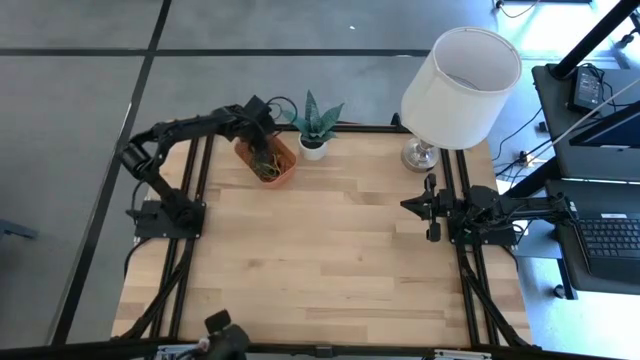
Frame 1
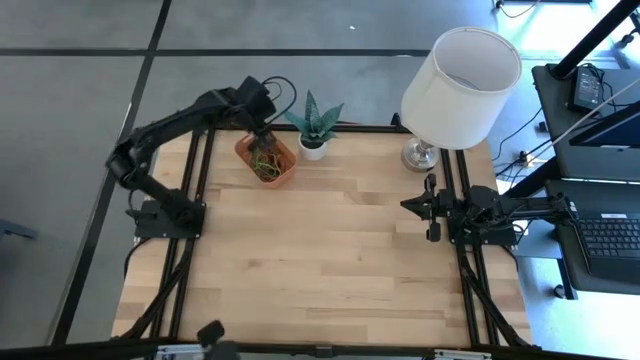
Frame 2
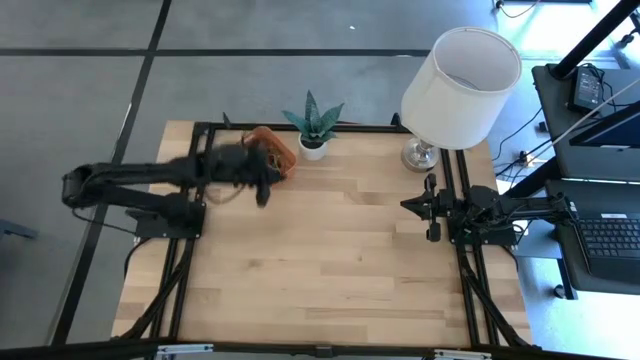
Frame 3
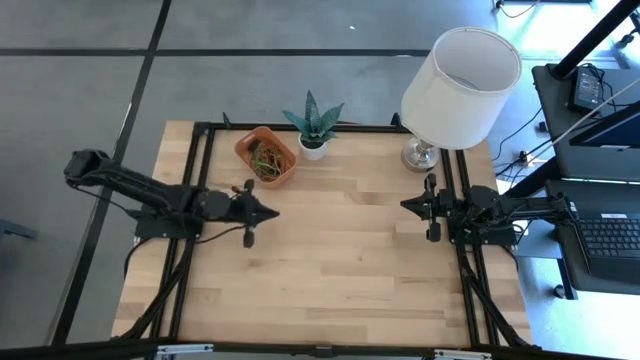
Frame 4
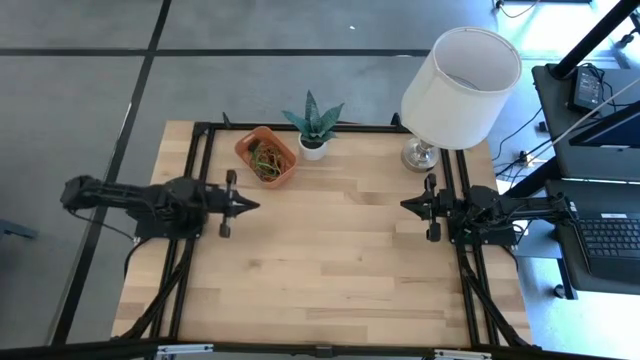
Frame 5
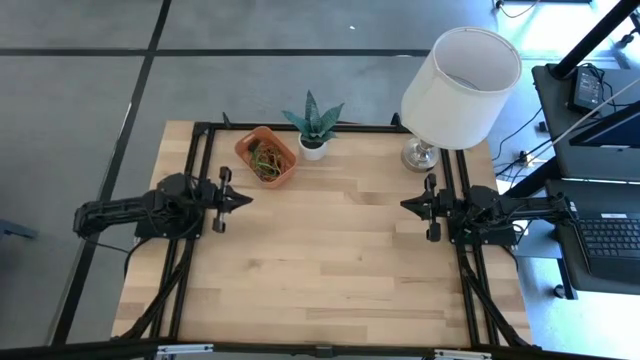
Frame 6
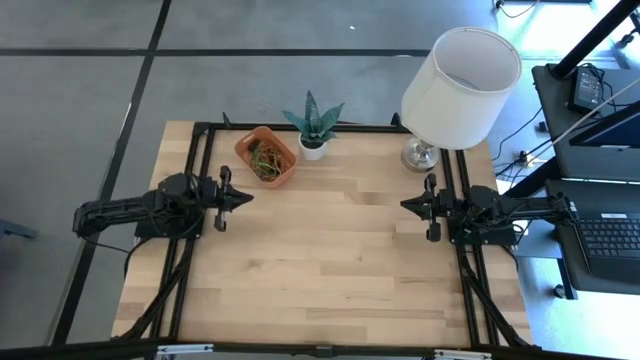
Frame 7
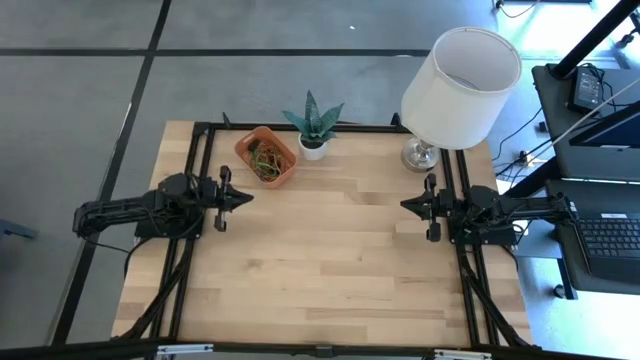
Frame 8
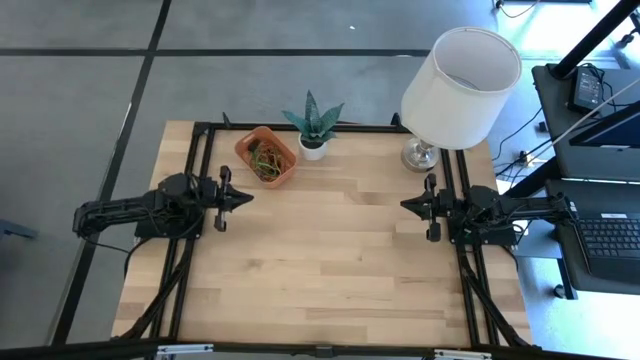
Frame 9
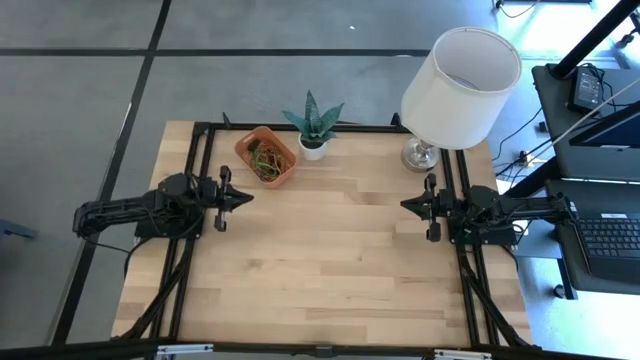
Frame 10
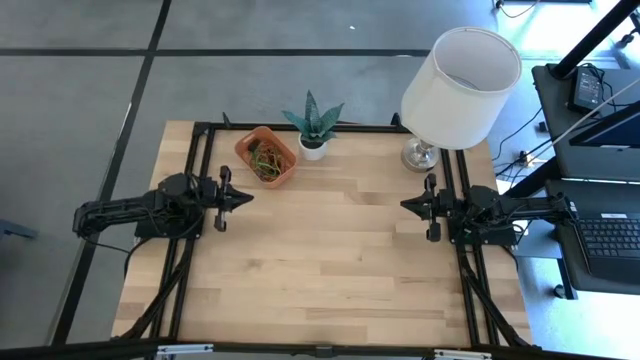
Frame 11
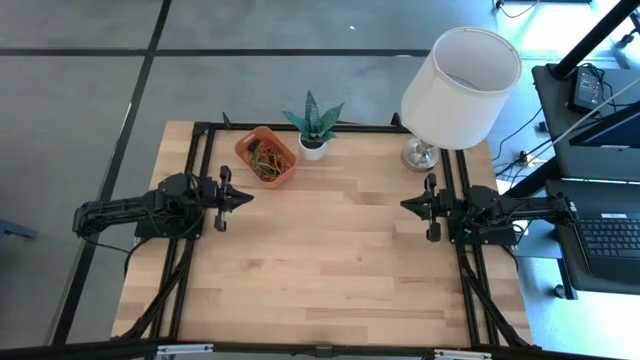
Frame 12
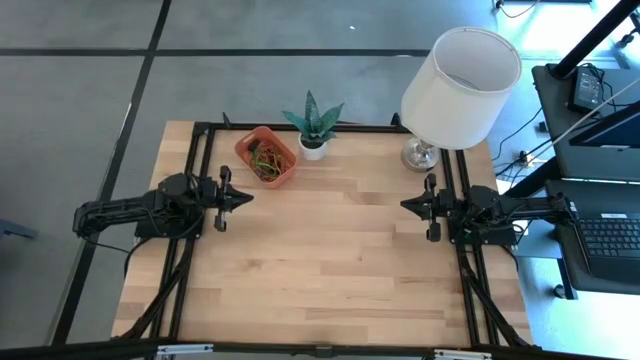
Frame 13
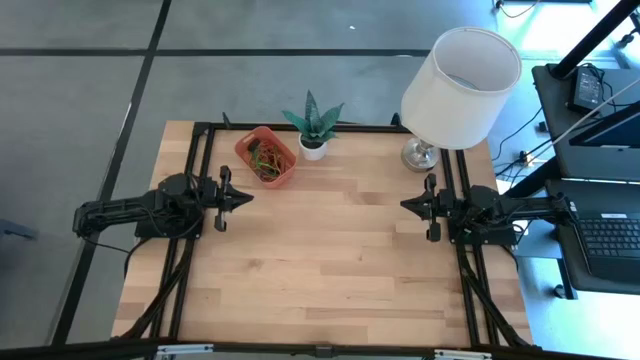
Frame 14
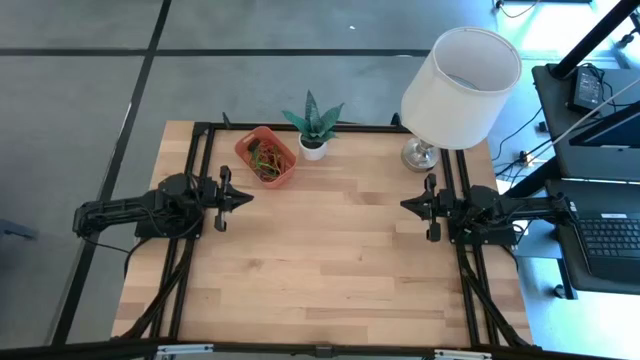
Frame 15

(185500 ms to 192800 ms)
Task: Pick and place rubber bands into bin
Return to Home Position

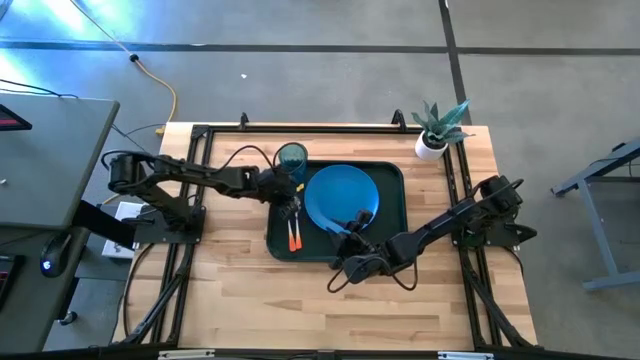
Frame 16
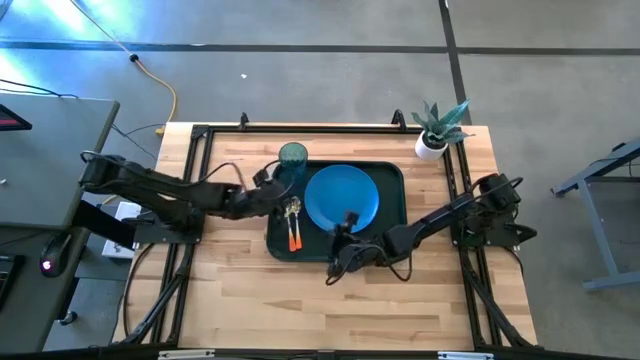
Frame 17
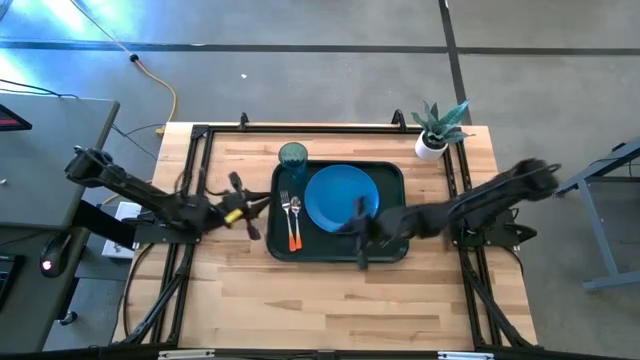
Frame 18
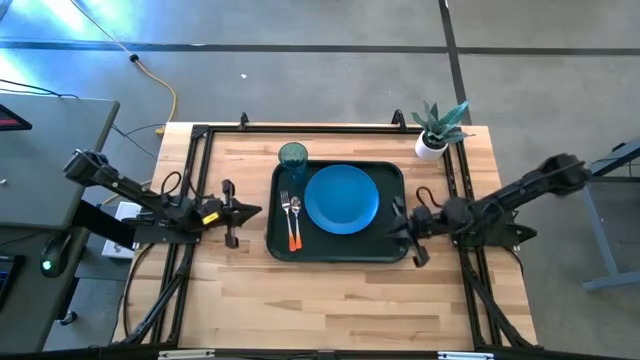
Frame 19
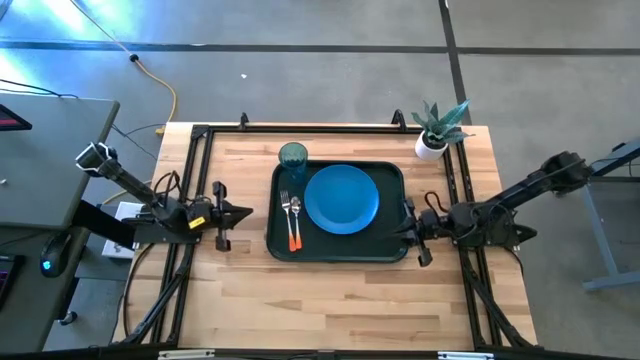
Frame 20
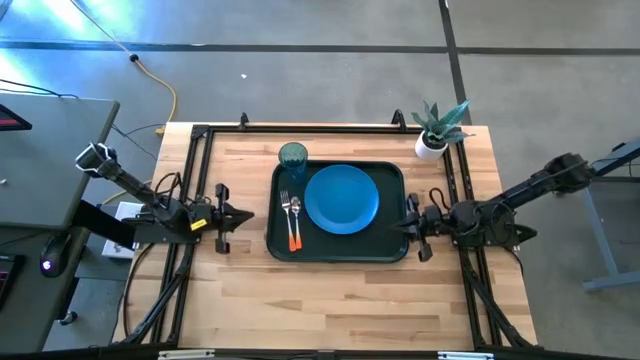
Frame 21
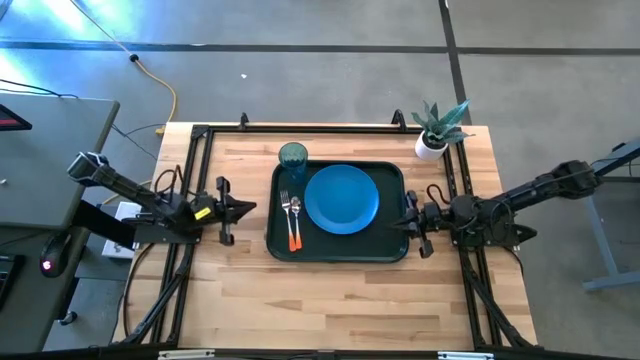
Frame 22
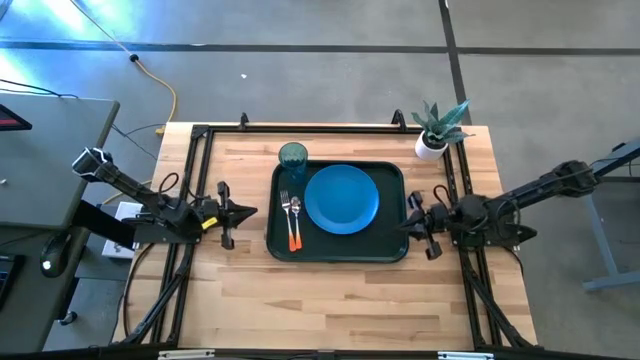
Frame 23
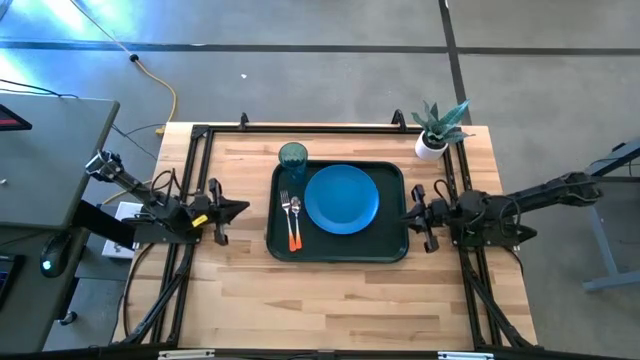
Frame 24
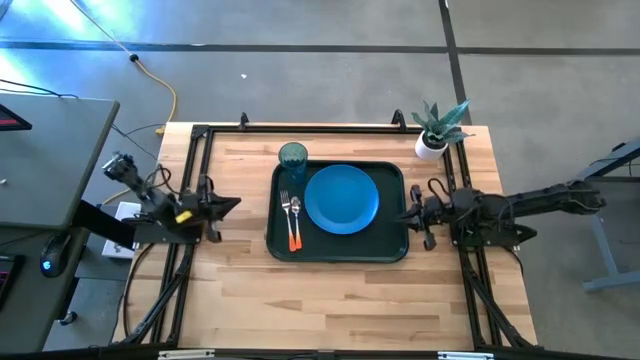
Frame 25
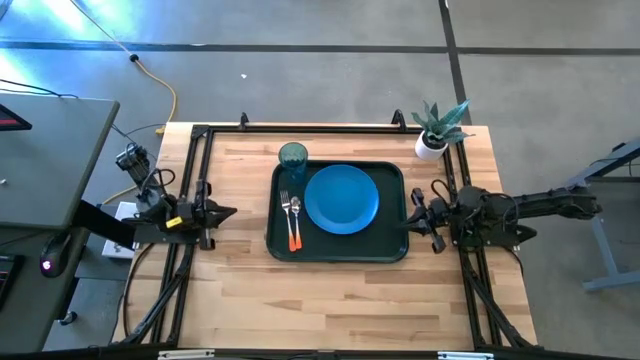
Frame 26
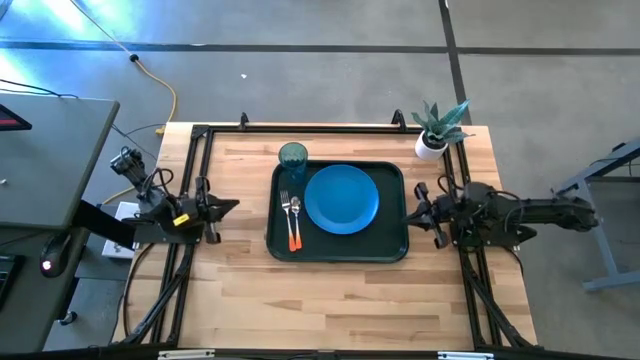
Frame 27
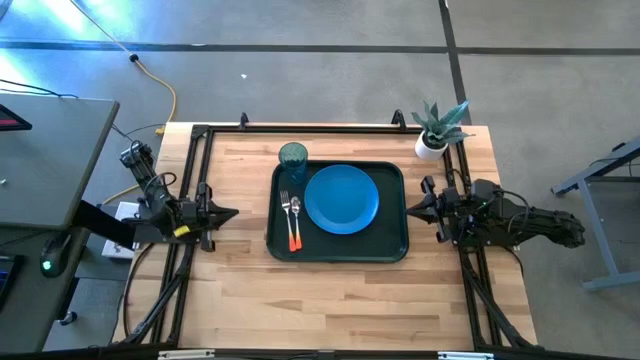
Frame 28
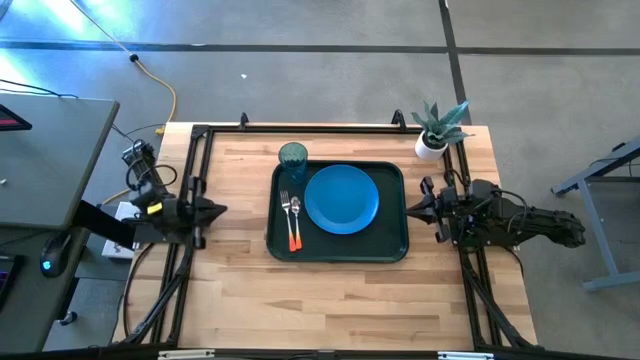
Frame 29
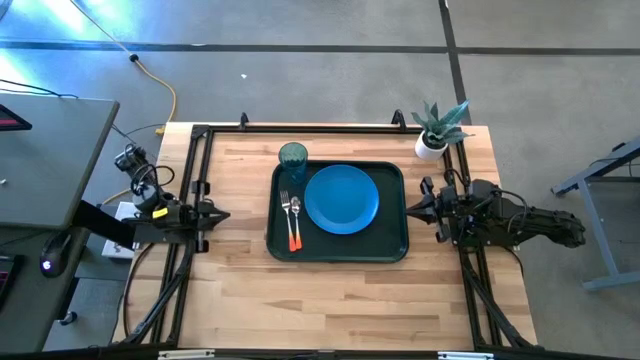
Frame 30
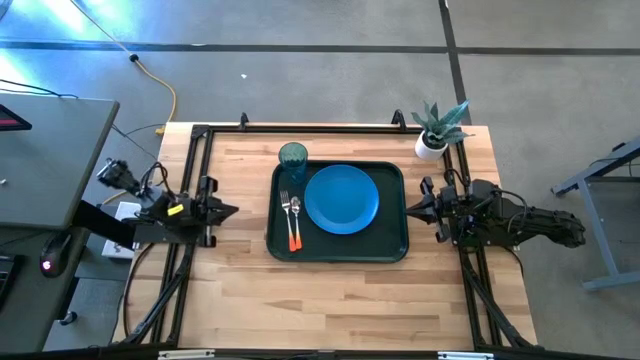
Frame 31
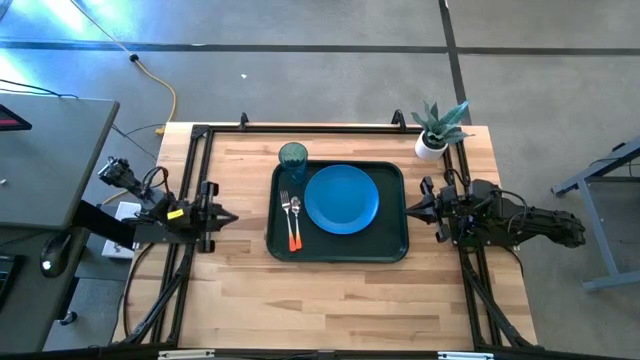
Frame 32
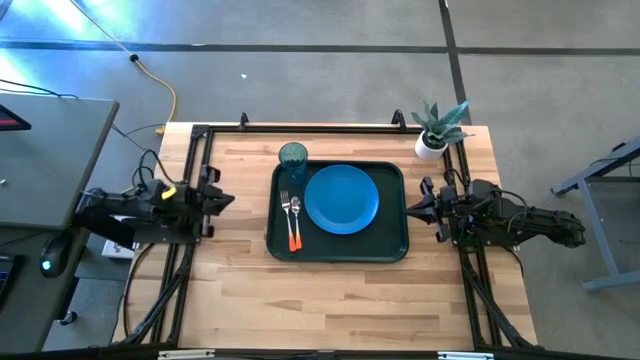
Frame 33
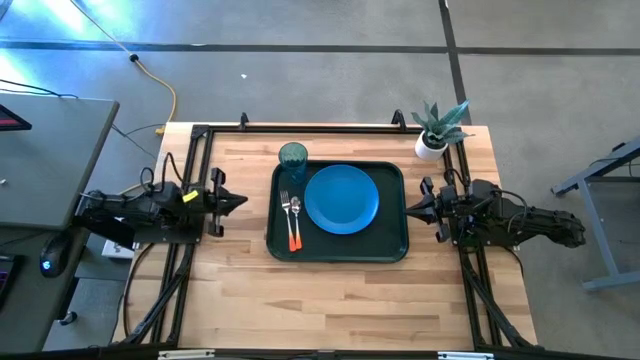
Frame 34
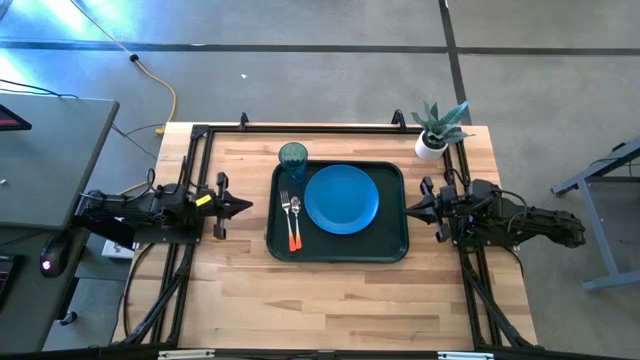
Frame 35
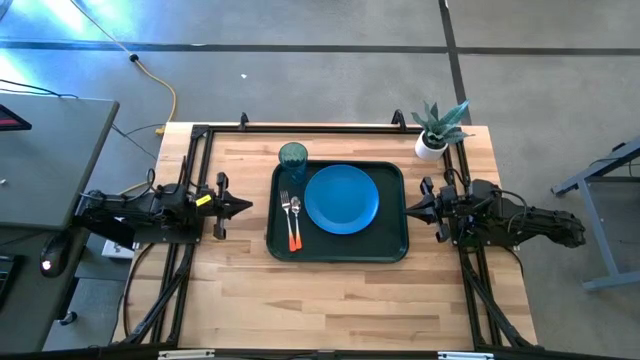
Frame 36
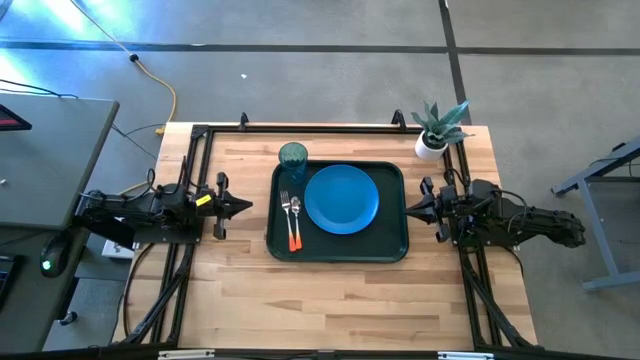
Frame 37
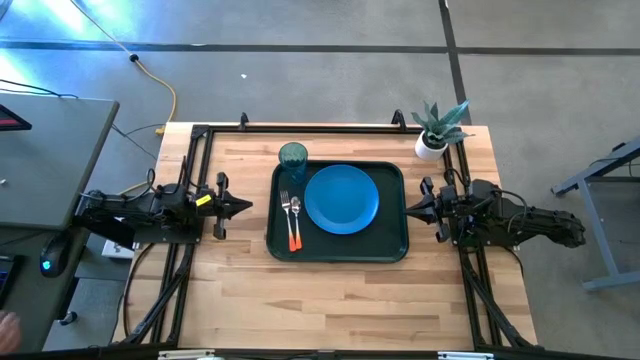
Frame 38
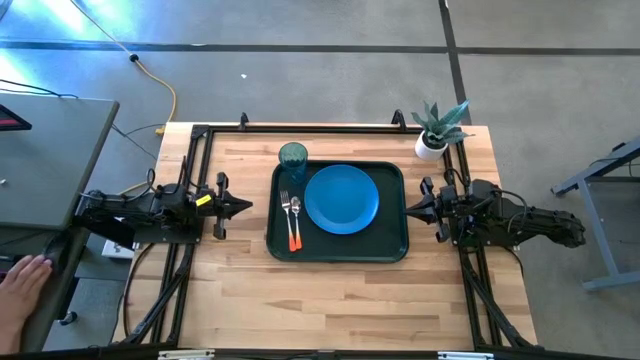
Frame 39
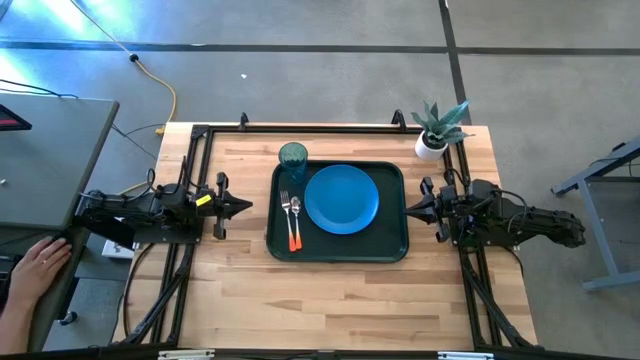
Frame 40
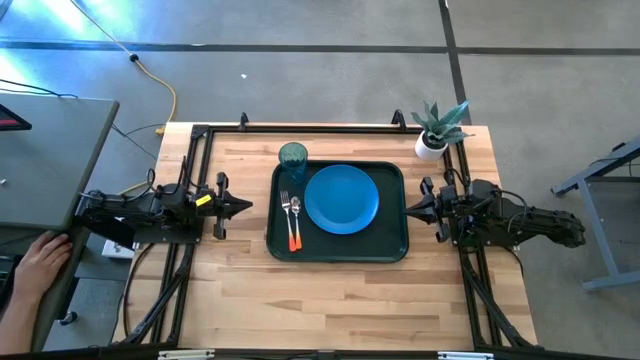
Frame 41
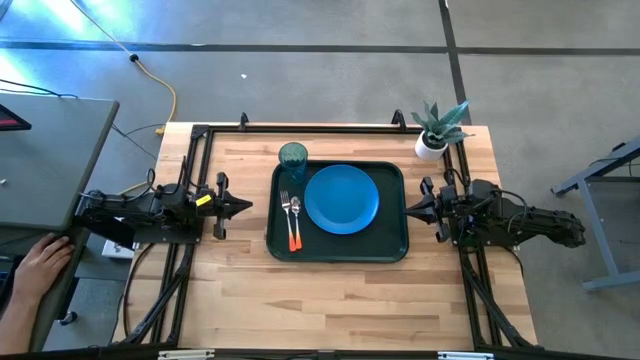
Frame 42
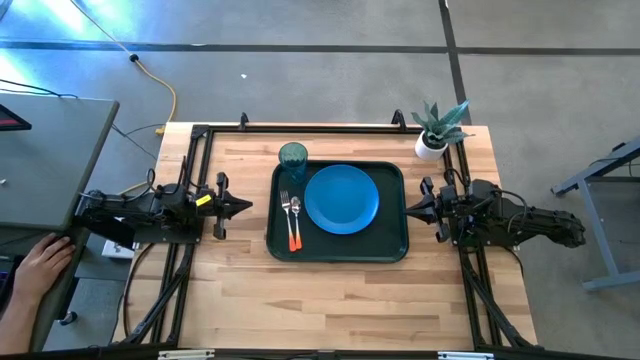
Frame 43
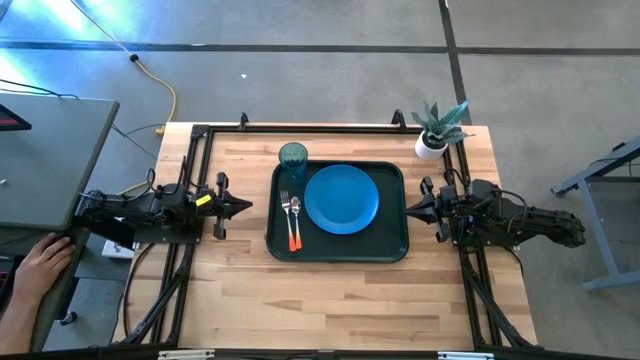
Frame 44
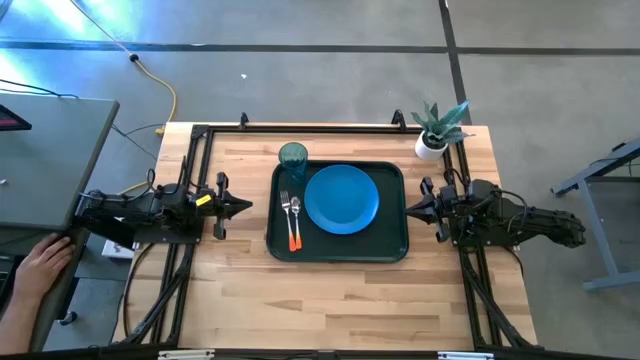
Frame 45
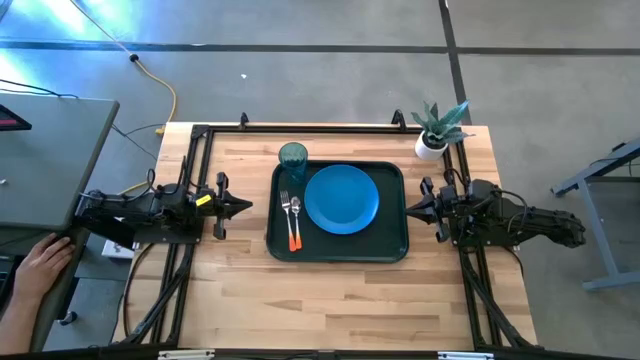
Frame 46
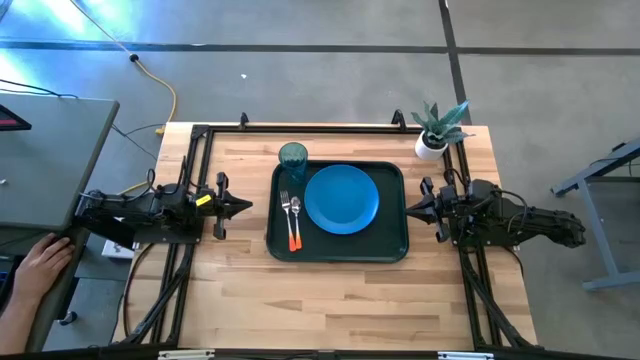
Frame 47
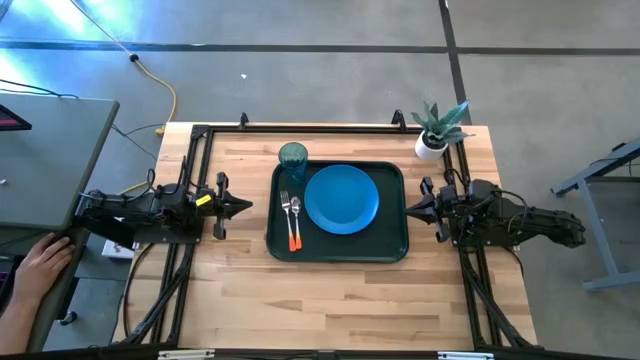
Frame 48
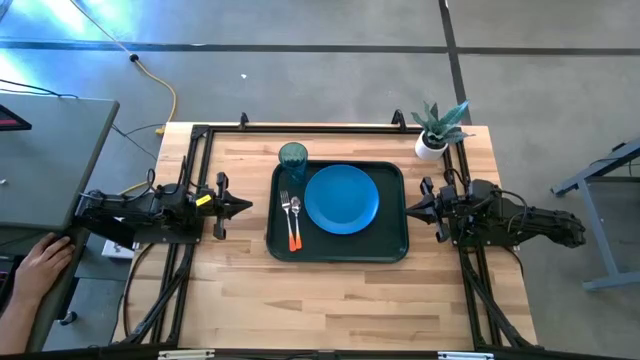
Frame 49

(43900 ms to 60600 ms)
Task: Pick and place plate/cup/fork/spoon on tray
Return to Home Position
